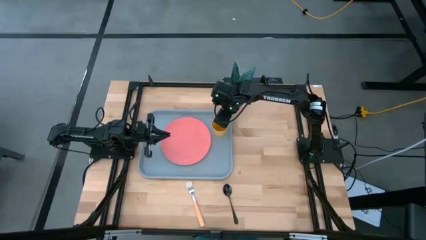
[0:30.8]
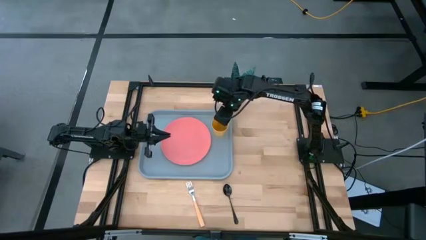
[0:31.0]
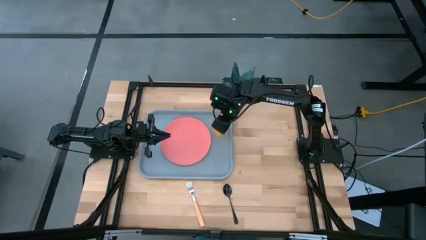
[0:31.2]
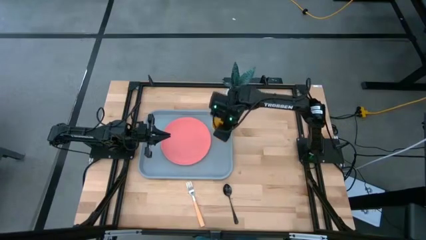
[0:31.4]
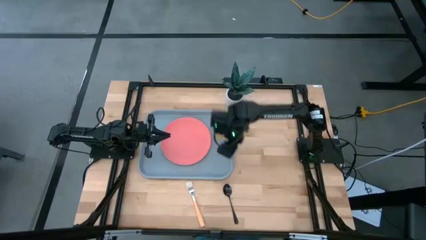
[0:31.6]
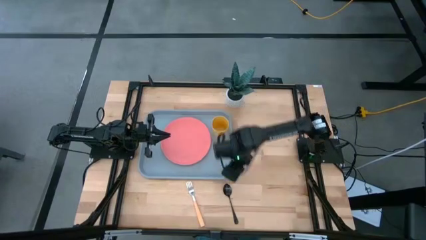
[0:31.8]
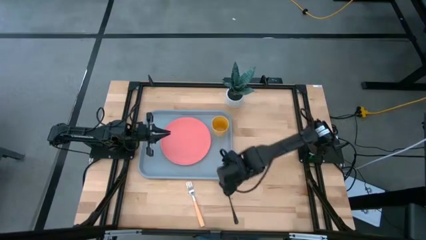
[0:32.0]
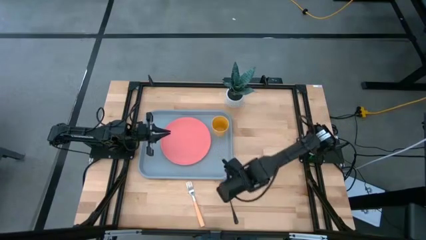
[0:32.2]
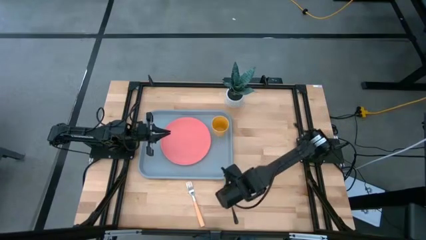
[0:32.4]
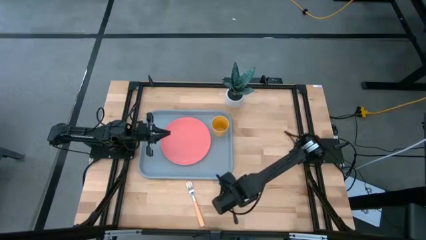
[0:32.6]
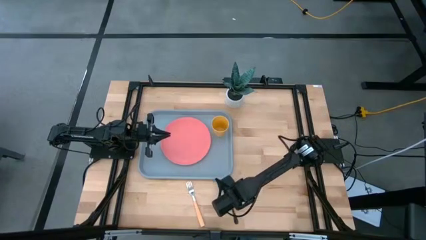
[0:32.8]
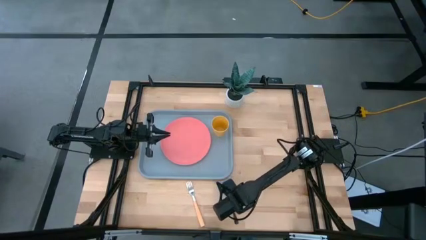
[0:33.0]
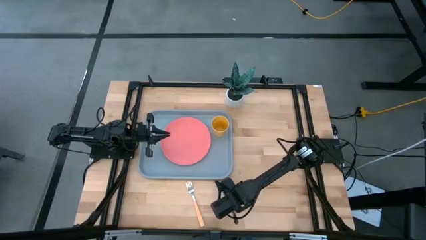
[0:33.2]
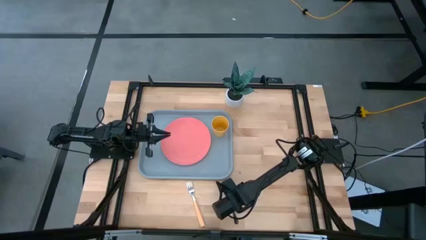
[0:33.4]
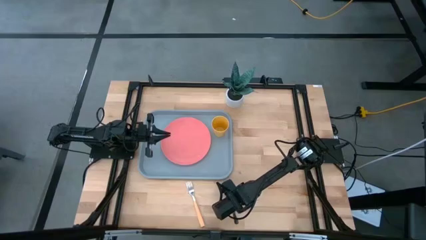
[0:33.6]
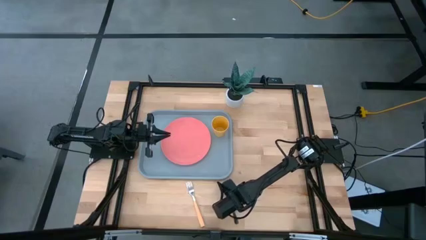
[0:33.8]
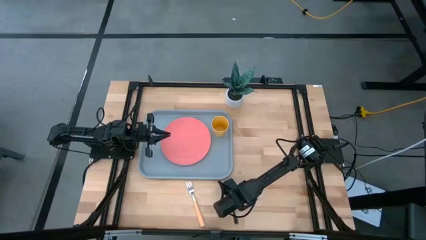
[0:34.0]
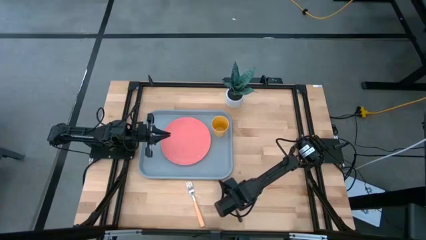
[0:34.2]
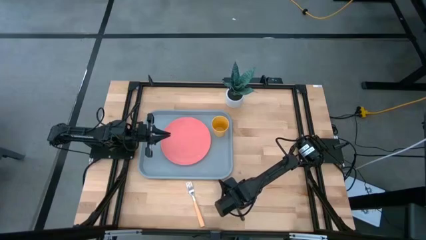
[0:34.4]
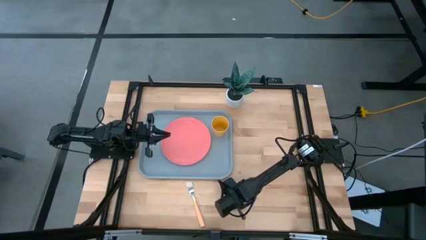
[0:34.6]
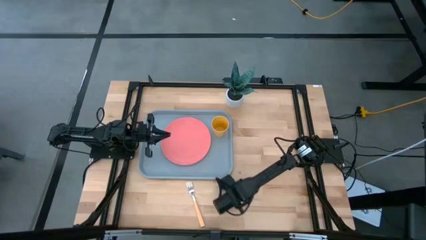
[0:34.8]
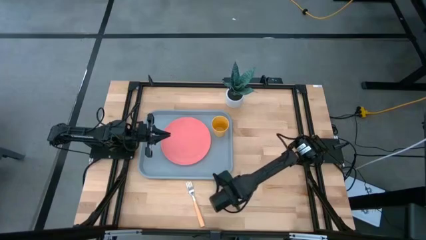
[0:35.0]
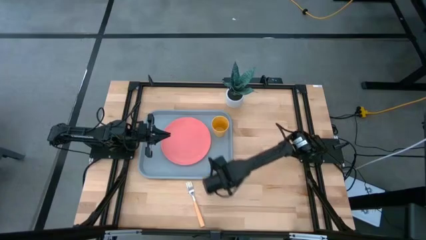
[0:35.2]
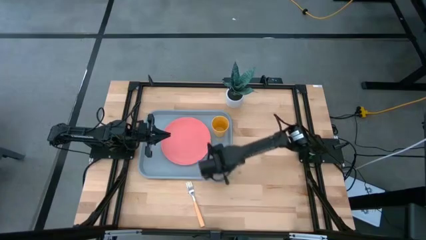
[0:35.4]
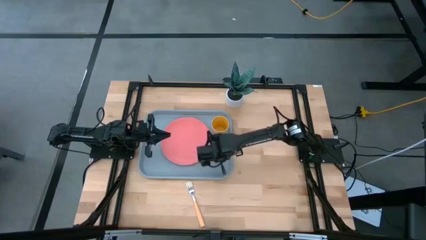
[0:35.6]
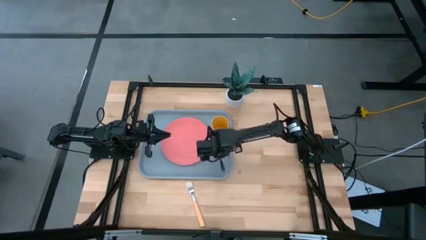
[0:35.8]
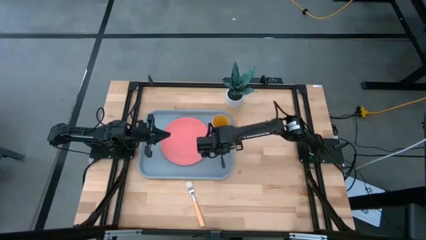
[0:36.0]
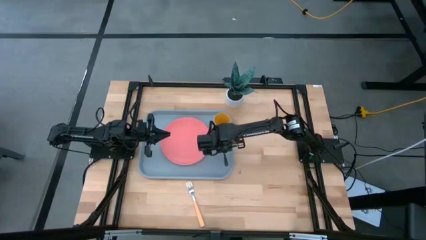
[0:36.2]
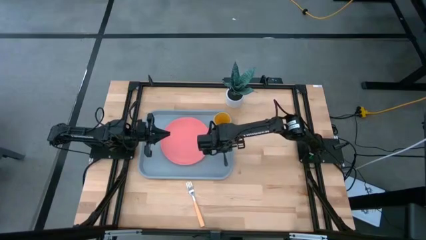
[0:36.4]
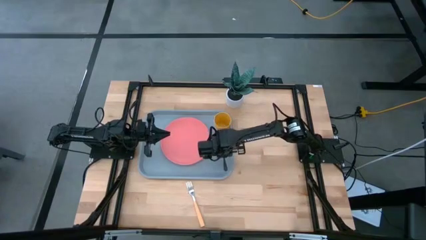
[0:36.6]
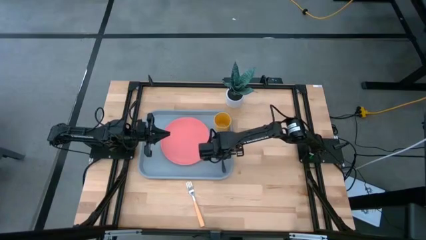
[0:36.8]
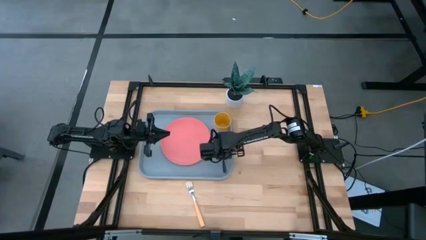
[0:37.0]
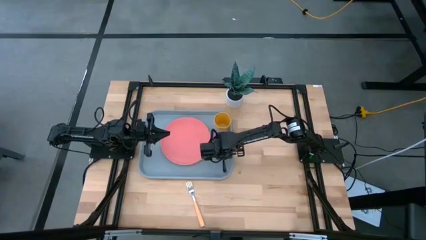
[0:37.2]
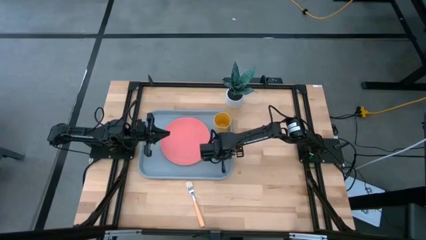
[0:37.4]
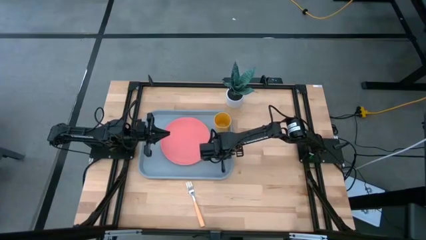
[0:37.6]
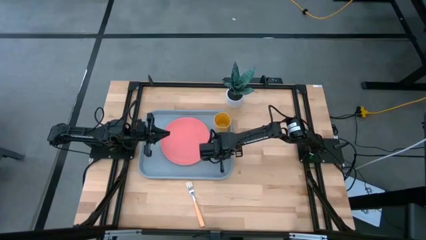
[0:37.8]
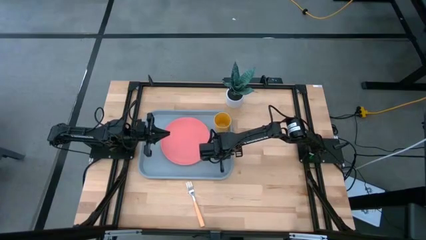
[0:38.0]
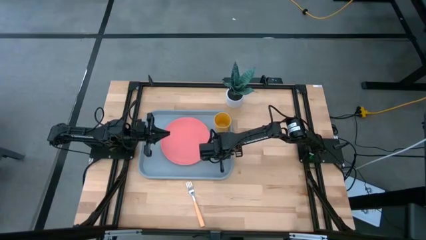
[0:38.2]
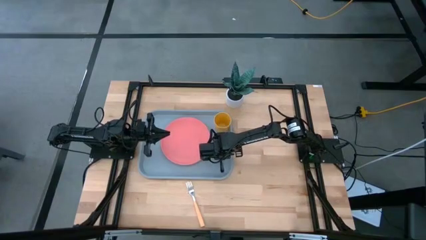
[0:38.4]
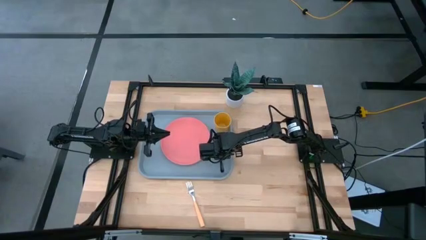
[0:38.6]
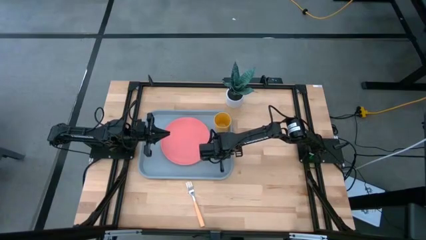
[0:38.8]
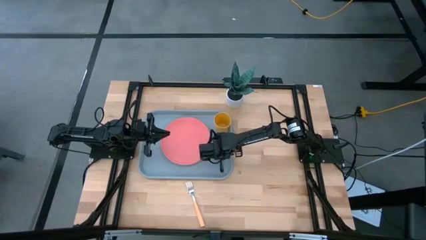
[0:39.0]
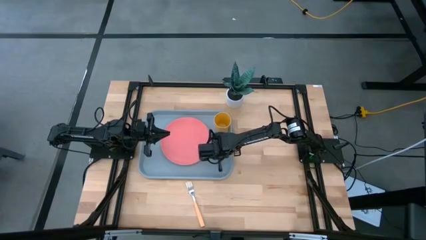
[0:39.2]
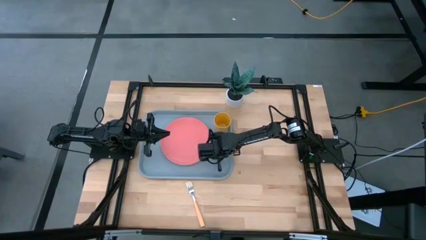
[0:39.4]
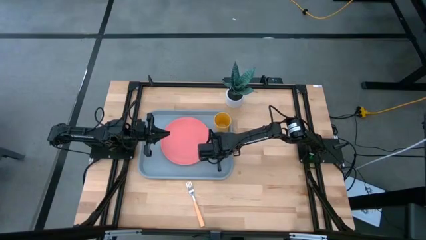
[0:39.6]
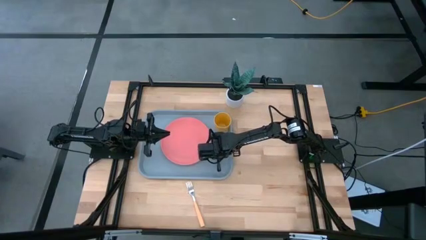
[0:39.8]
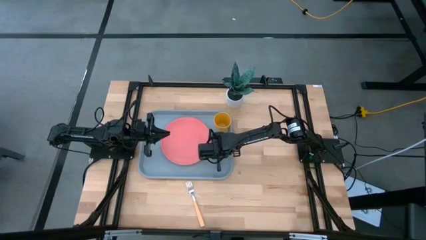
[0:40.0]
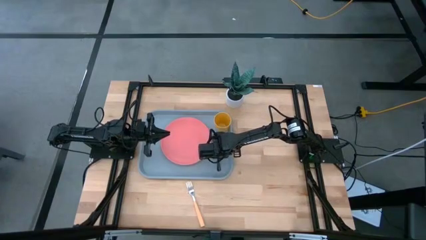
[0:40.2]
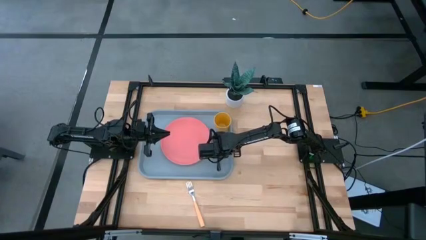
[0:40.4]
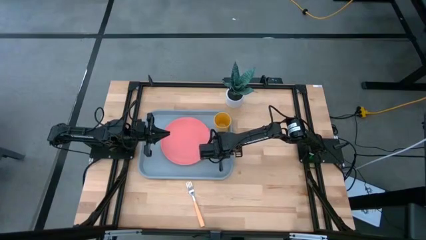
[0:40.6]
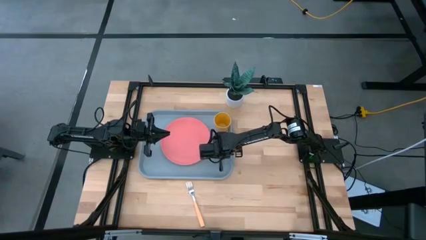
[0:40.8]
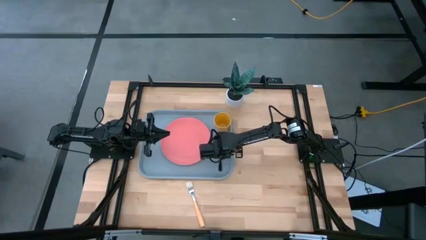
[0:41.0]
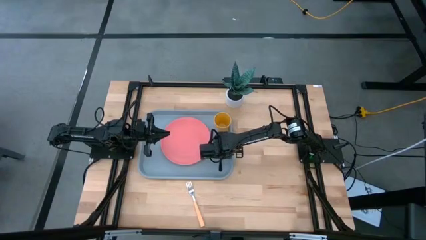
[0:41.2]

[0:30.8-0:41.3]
Task: Pick and place plate/cup/fork/spoon on tray
Put the black spoon on the gray tray
